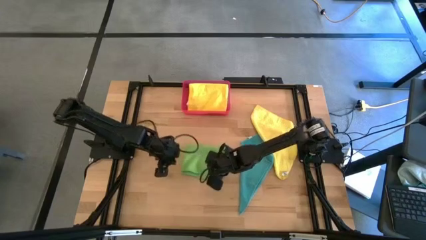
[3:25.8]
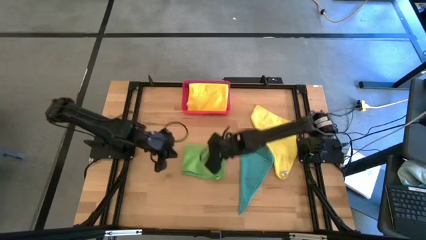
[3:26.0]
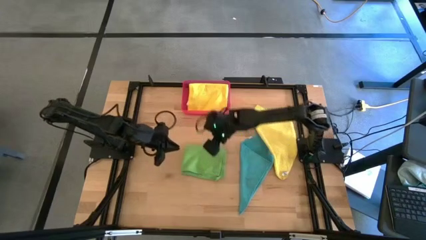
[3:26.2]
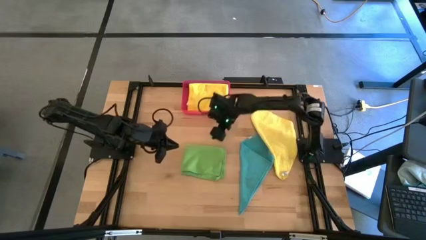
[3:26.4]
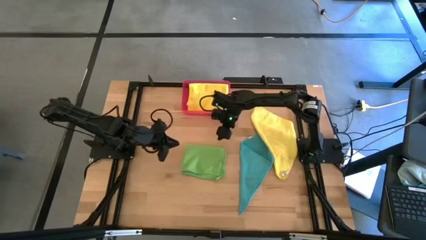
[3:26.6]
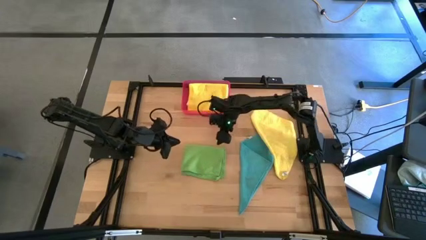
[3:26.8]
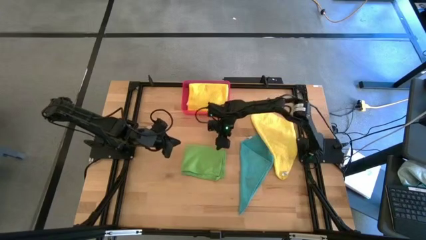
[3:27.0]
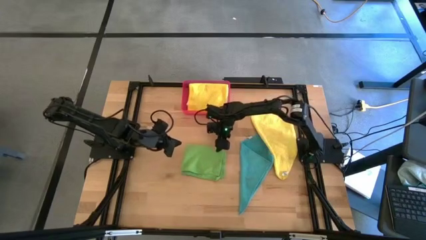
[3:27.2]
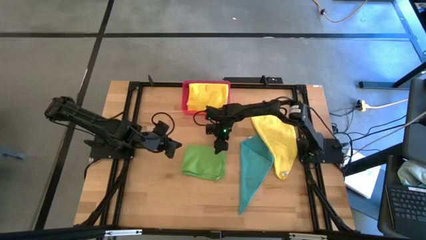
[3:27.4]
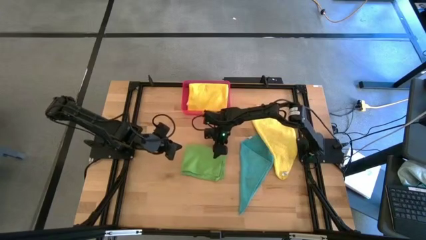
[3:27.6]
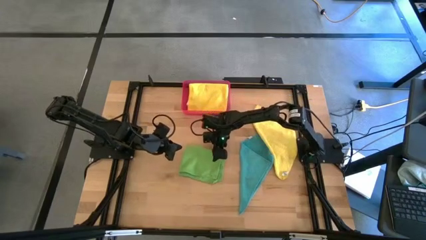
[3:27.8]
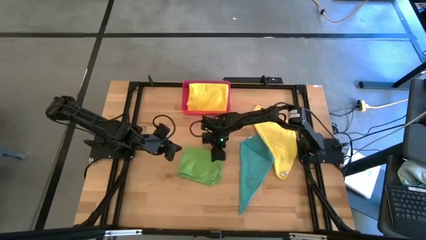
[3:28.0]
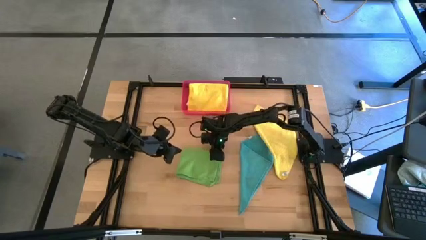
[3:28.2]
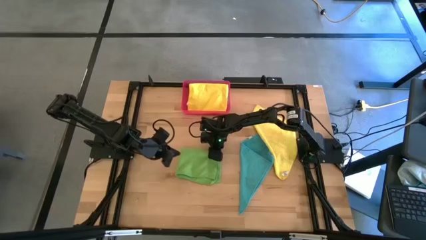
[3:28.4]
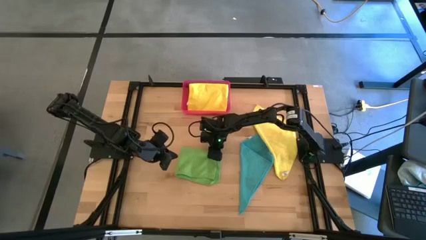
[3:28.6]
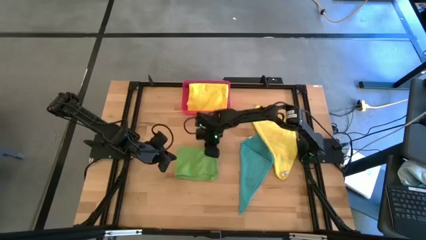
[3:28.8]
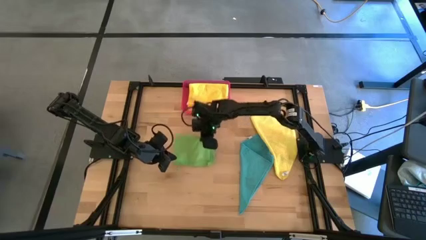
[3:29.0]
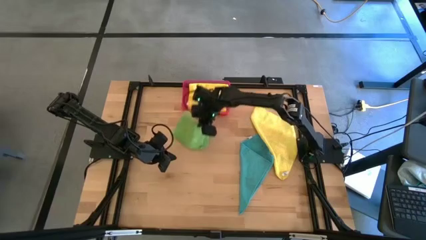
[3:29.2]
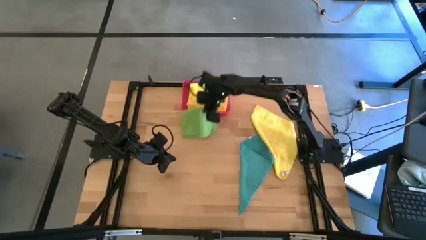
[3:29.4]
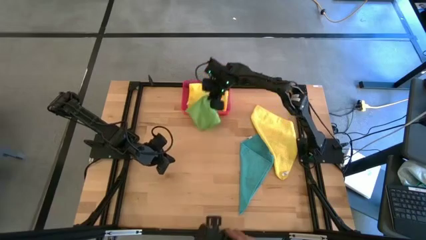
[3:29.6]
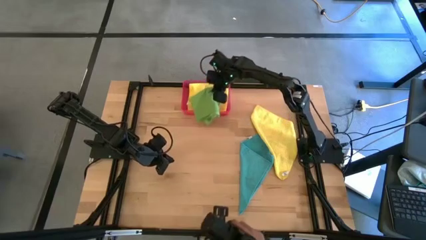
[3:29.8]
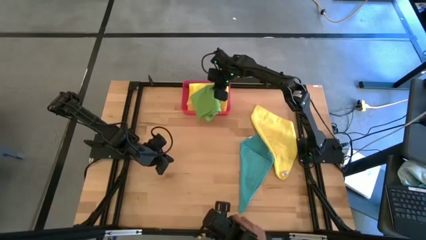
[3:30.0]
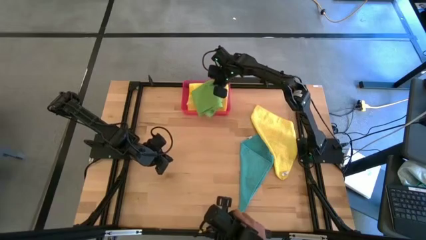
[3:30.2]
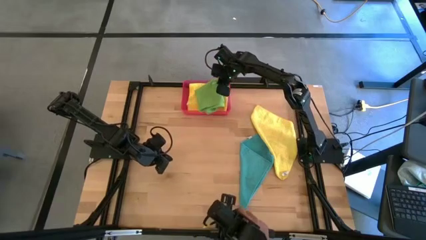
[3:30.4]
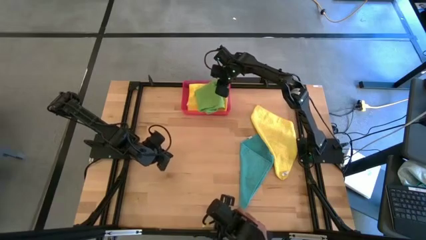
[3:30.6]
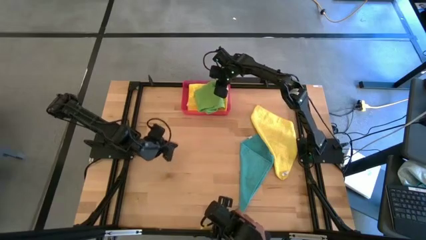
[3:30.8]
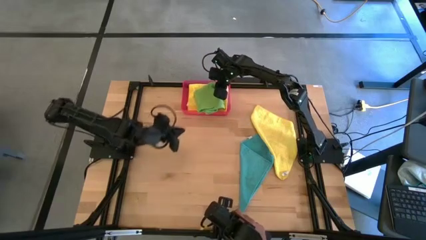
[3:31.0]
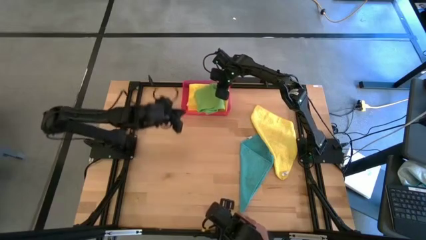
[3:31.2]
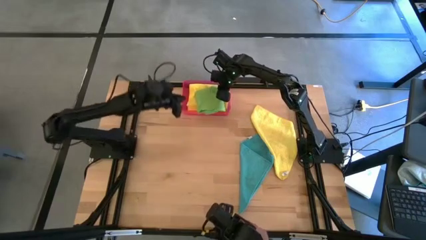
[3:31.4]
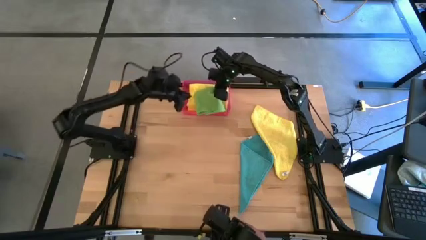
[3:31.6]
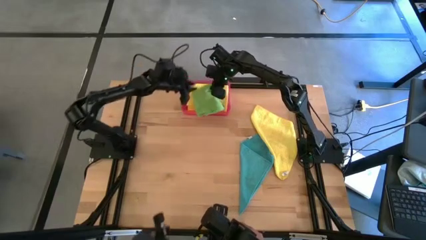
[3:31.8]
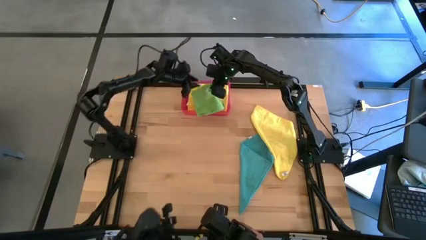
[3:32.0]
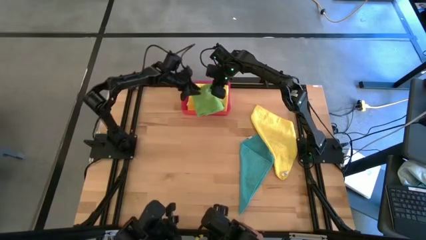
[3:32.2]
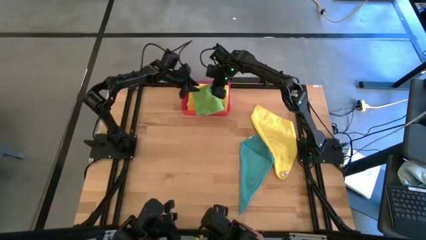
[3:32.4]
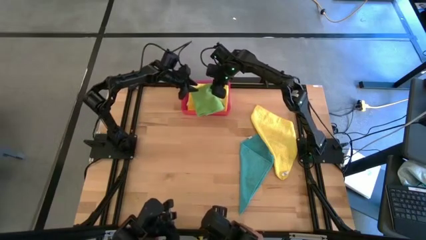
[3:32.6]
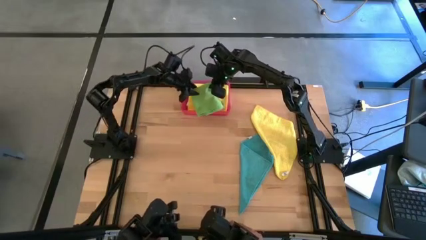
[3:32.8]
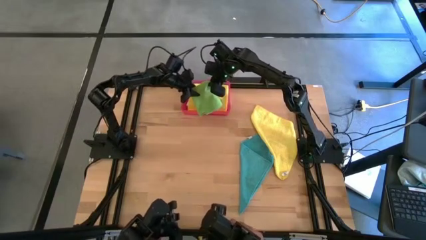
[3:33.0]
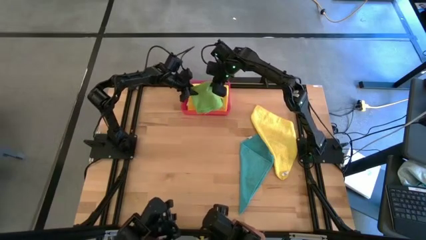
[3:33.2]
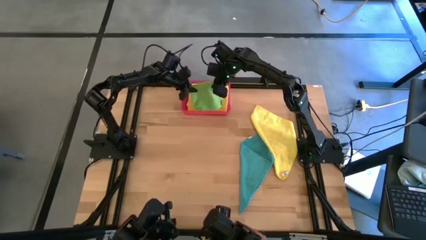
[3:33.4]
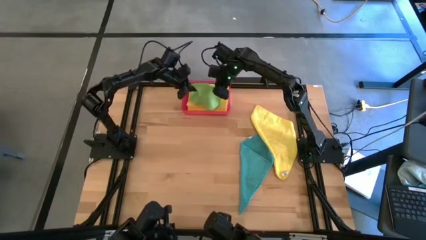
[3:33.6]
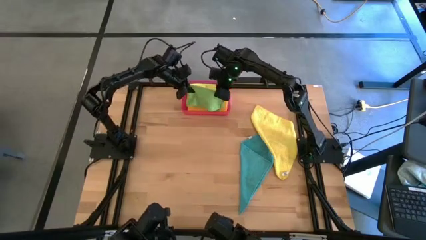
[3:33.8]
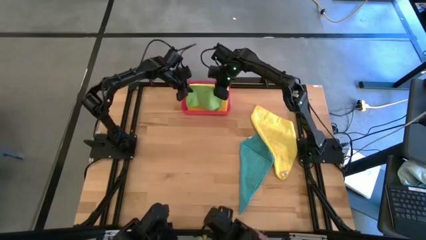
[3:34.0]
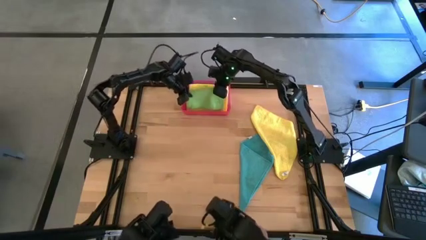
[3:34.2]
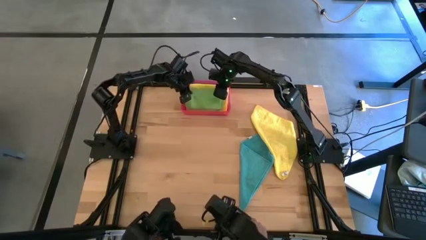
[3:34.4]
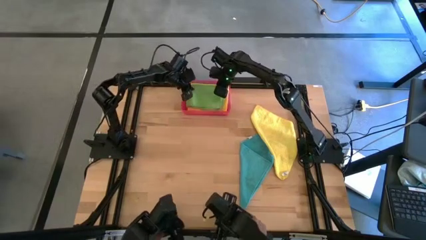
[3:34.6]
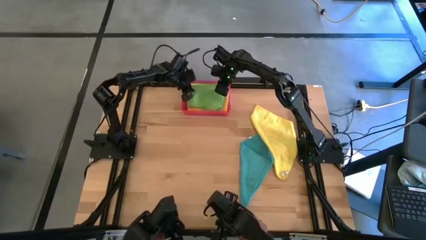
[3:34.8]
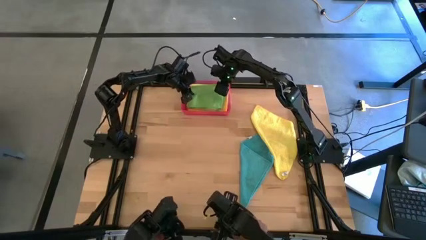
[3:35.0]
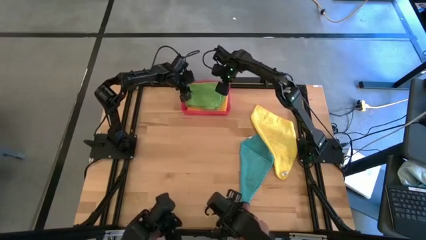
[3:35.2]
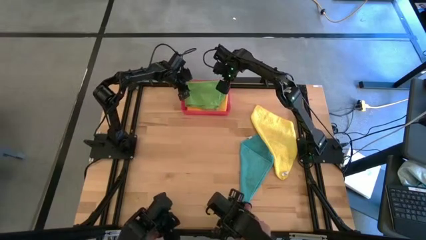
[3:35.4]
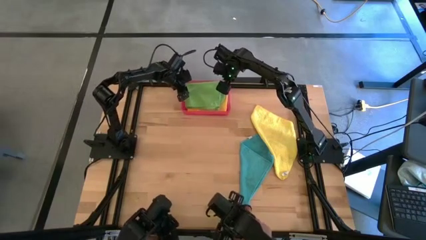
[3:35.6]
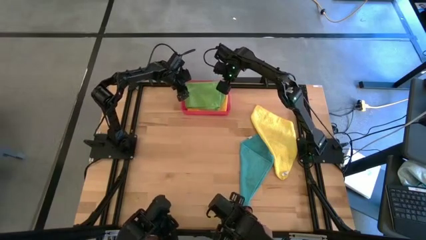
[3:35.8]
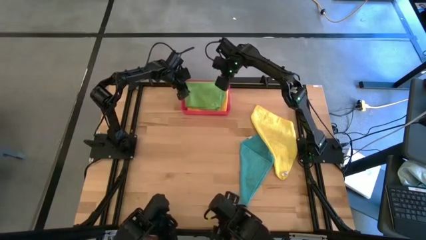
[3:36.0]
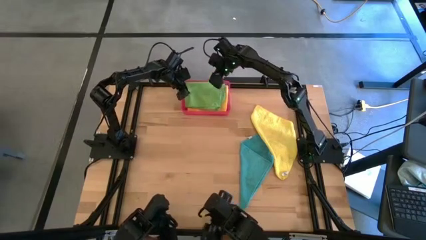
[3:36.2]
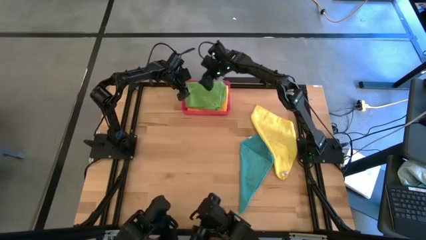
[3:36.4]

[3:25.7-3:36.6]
Task: Fold microfiber towels
Stack the folded green microfiber cloth on top of the yellow microfiber cloth in the bin

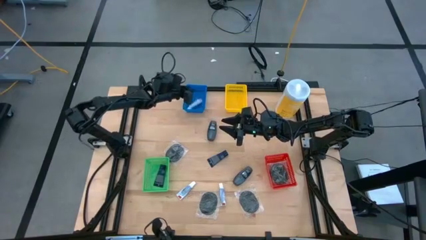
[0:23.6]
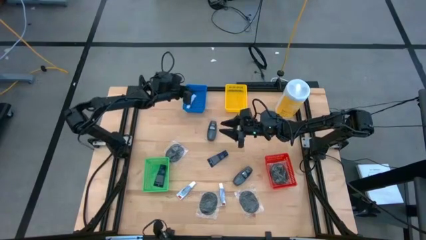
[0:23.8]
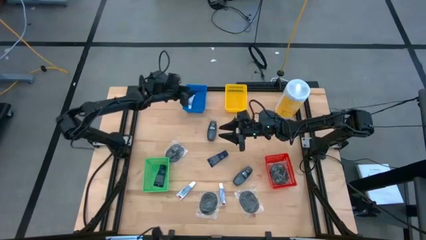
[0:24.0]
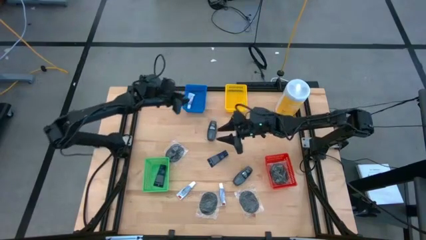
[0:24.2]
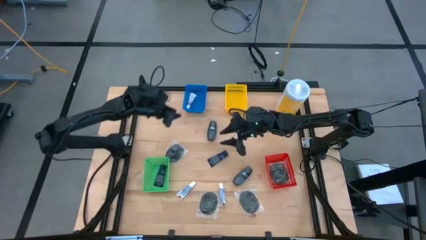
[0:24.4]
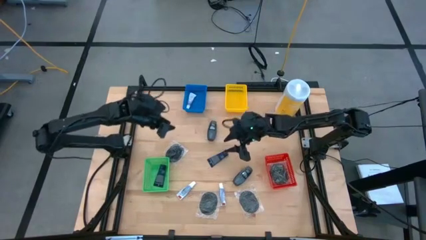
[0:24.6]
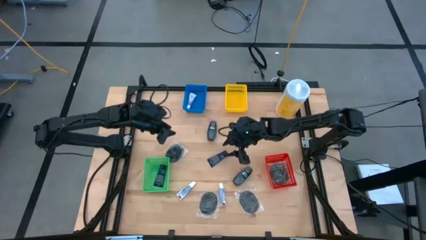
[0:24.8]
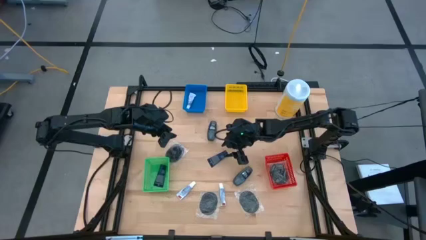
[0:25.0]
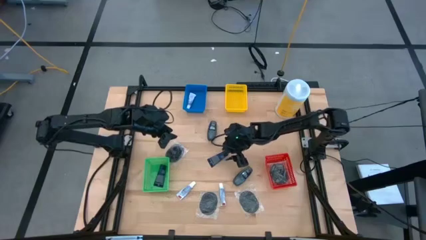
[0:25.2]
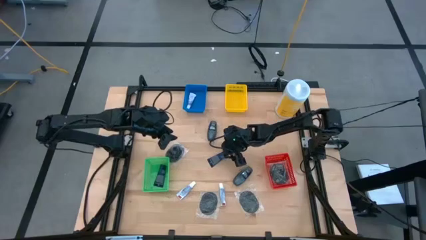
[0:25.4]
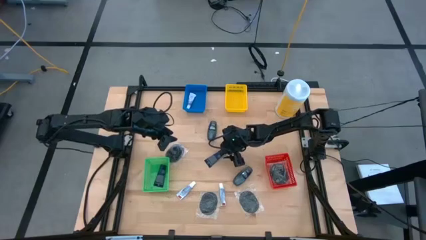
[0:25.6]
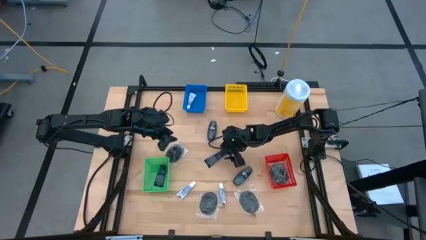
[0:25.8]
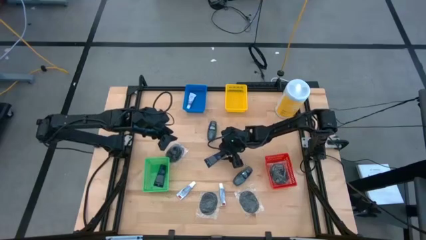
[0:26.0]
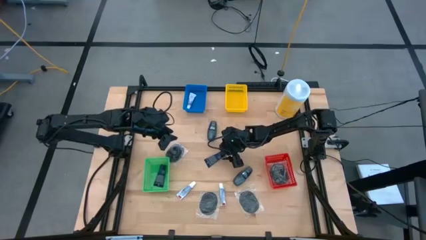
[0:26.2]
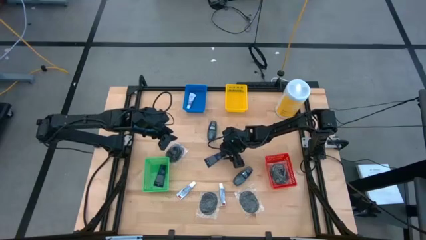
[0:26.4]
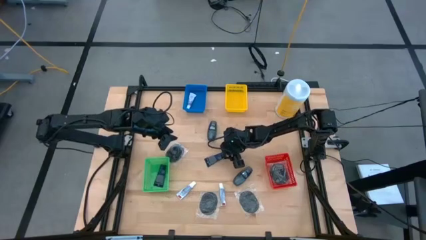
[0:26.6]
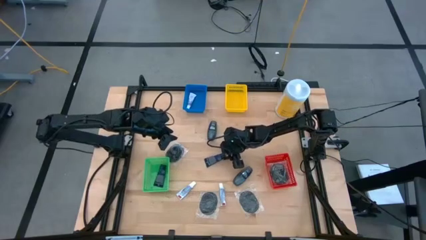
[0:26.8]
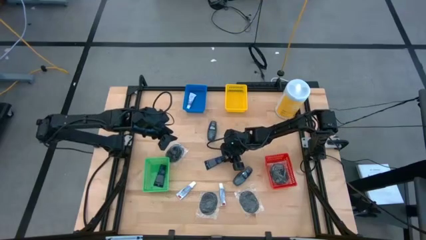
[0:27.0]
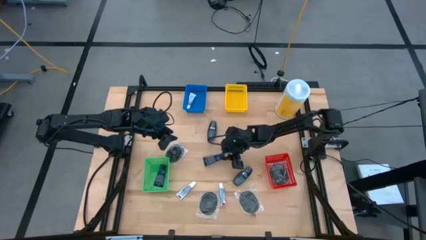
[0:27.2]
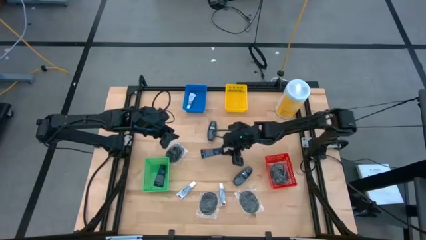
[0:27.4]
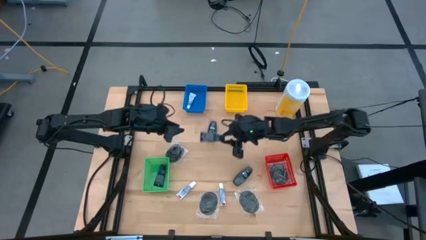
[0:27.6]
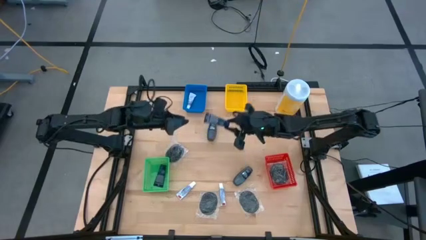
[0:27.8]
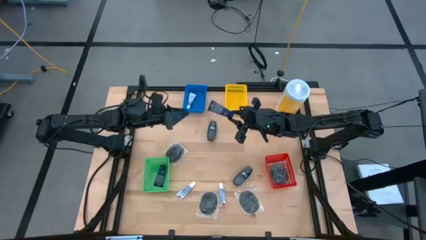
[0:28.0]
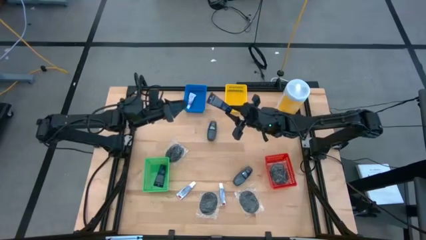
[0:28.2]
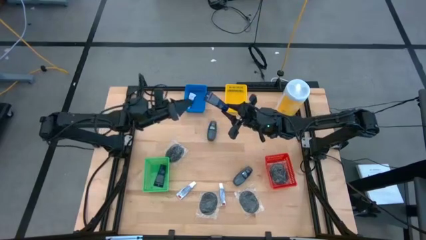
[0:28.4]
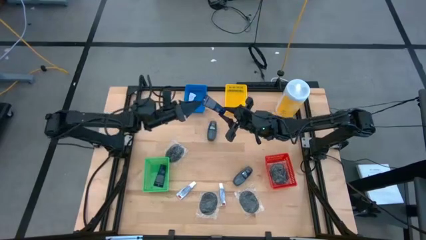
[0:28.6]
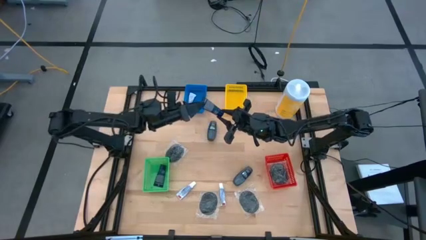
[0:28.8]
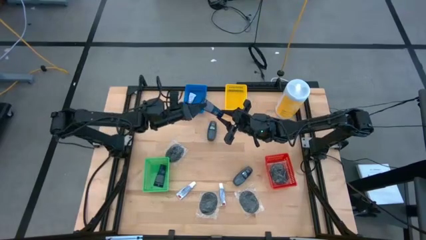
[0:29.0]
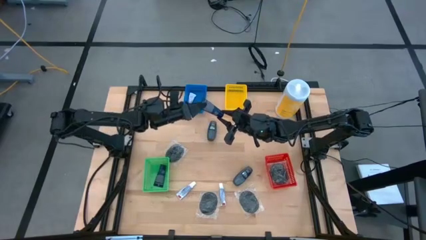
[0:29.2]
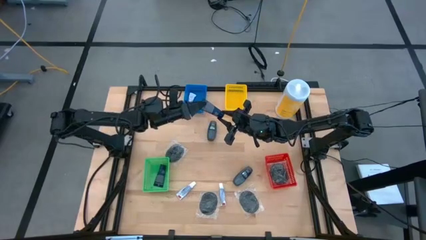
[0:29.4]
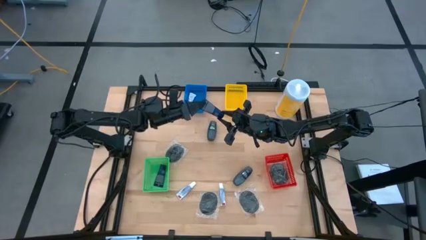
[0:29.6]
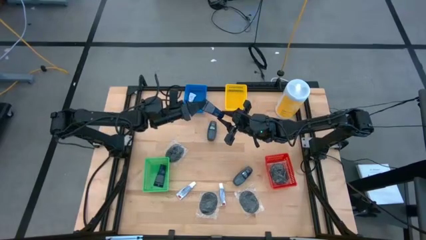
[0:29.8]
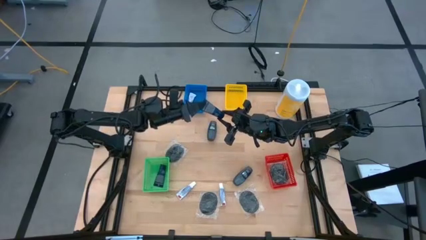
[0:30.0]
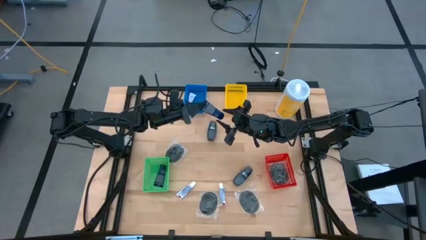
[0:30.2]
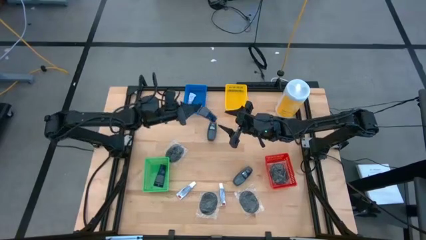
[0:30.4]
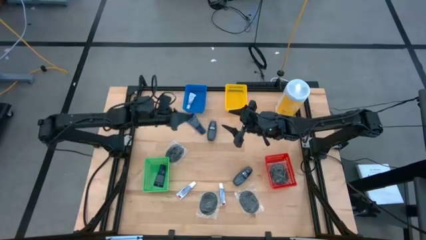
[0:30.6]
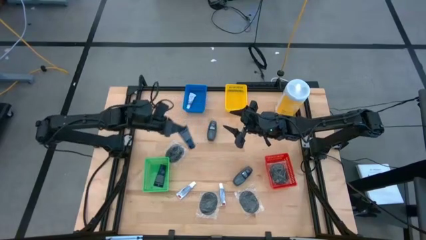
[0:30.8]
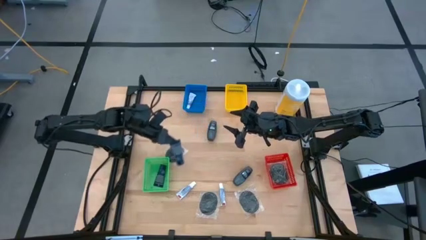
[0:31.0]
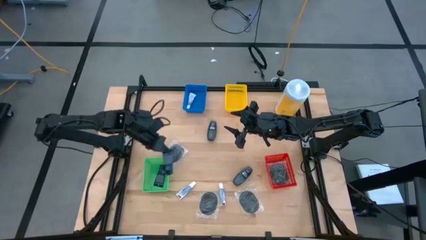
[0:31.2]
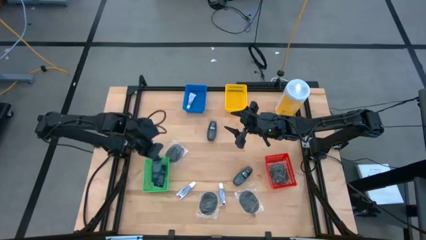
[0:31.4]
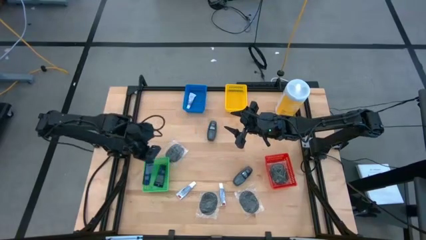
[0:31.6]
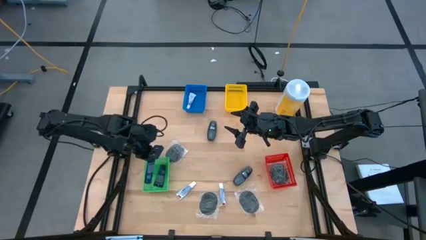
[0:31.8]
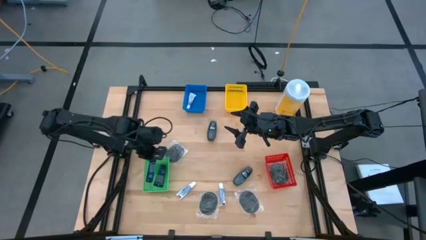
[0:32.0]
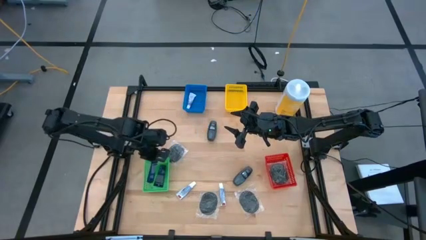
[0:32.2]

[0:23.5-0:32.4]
Task: Pick & Place Travel size toiletries
Put the blue shaving cream into the green basket
